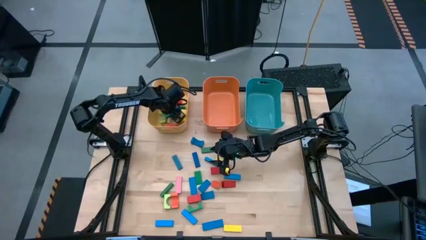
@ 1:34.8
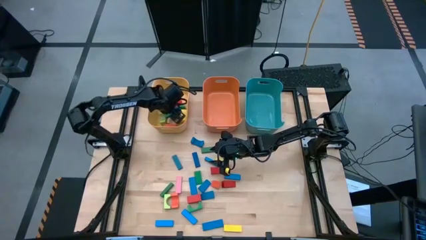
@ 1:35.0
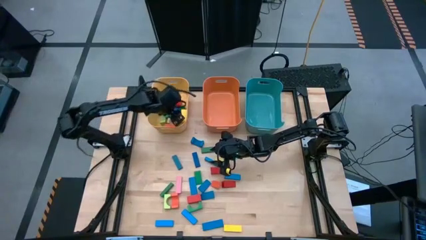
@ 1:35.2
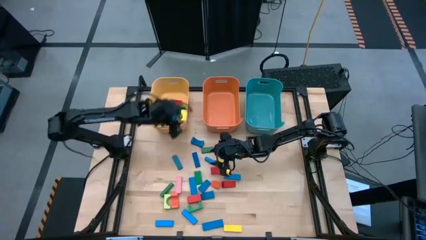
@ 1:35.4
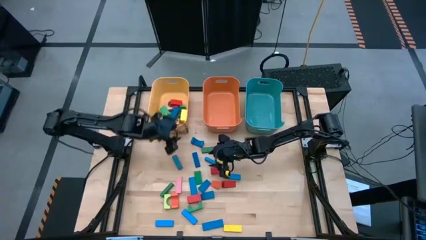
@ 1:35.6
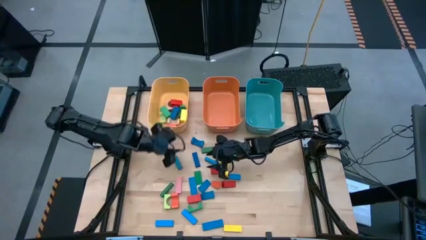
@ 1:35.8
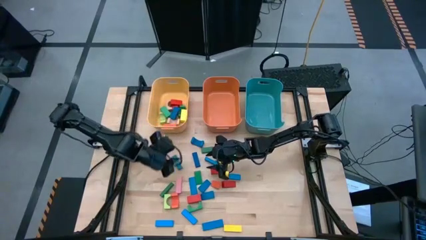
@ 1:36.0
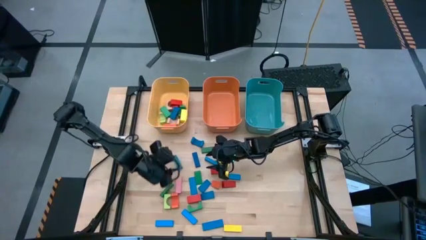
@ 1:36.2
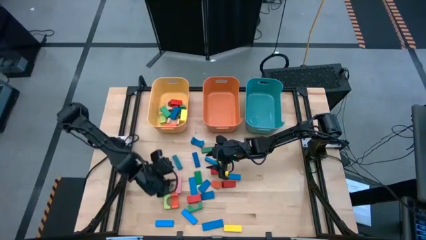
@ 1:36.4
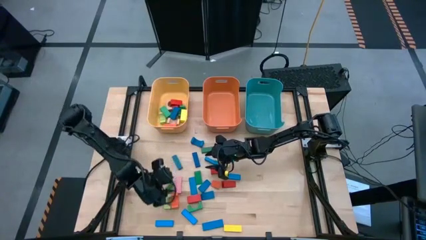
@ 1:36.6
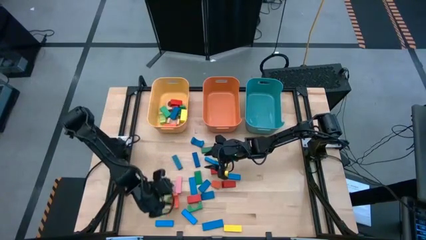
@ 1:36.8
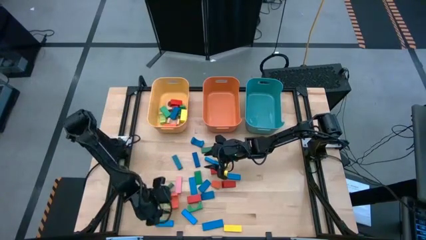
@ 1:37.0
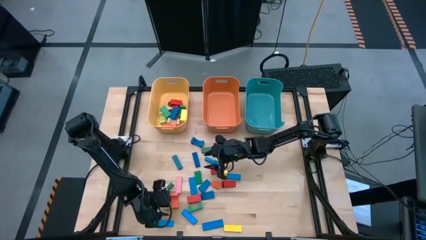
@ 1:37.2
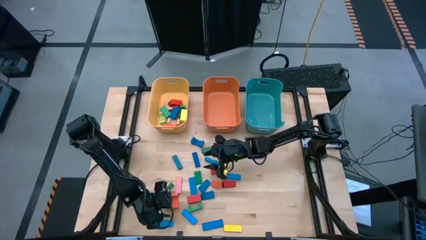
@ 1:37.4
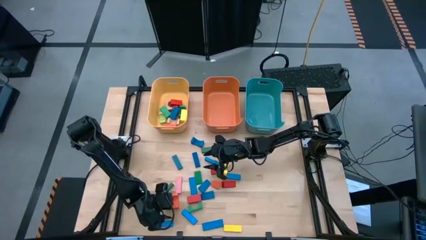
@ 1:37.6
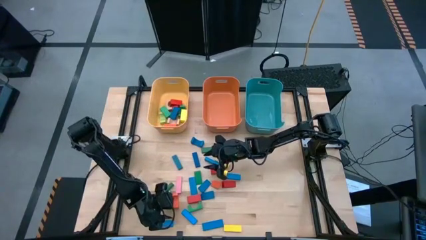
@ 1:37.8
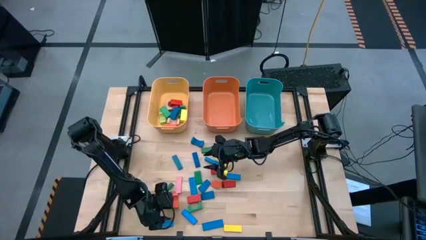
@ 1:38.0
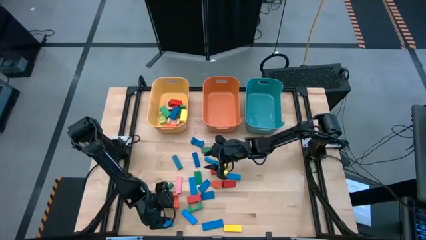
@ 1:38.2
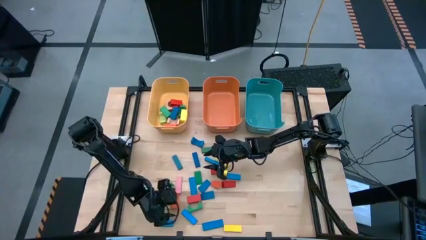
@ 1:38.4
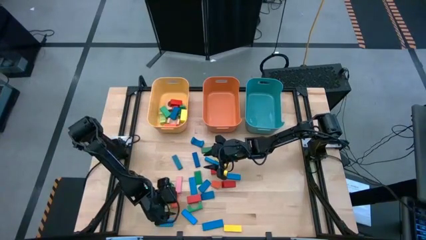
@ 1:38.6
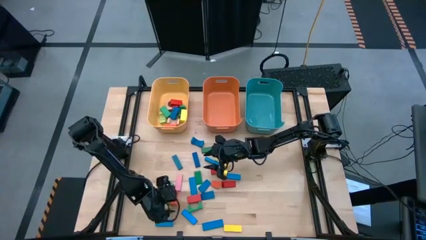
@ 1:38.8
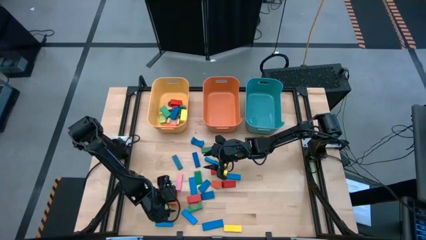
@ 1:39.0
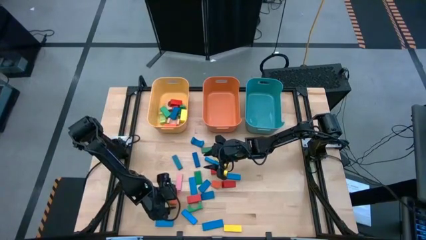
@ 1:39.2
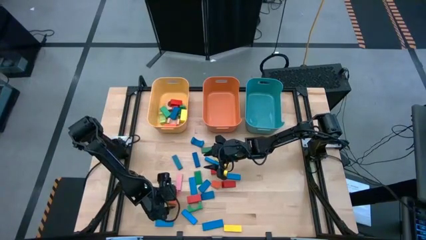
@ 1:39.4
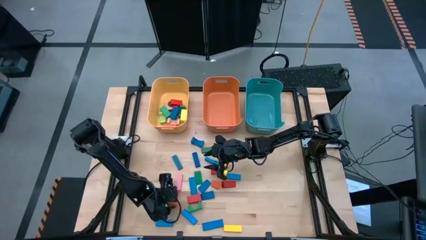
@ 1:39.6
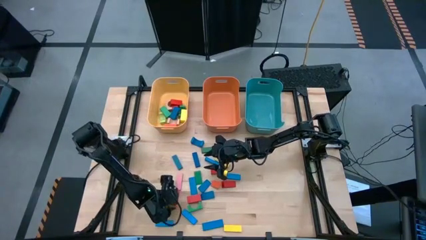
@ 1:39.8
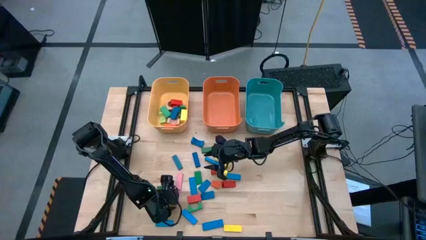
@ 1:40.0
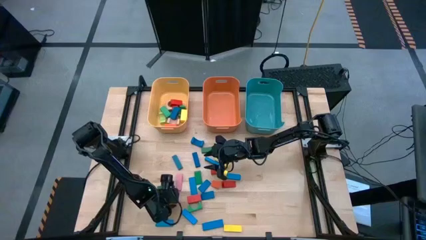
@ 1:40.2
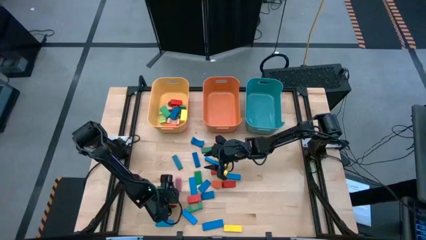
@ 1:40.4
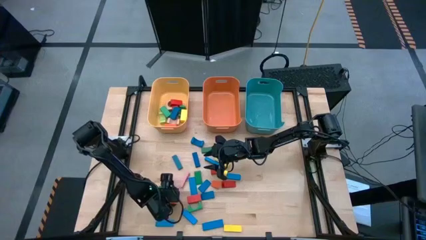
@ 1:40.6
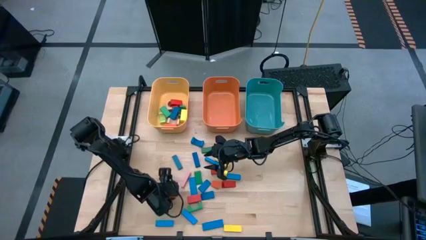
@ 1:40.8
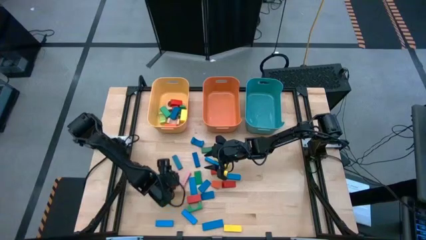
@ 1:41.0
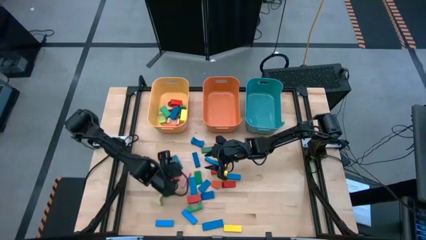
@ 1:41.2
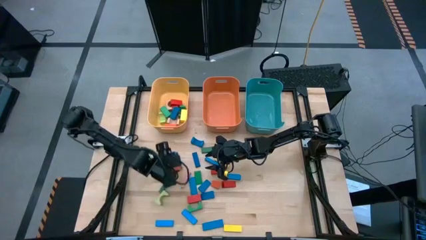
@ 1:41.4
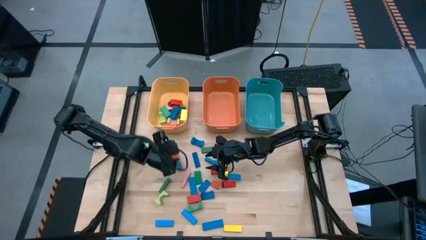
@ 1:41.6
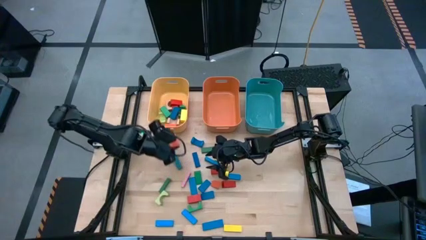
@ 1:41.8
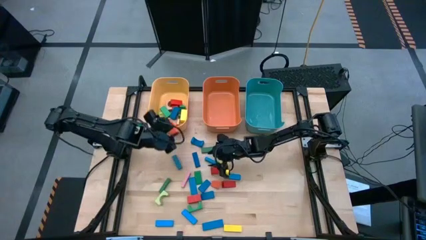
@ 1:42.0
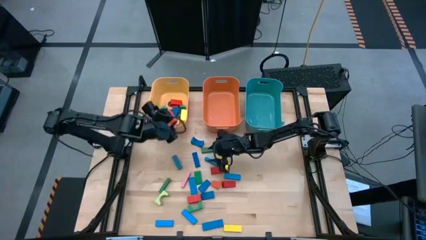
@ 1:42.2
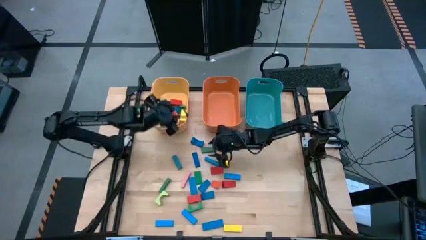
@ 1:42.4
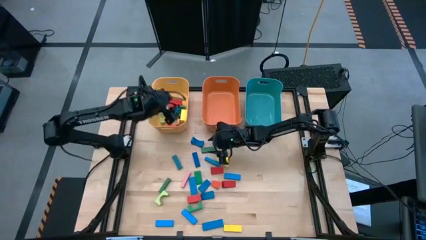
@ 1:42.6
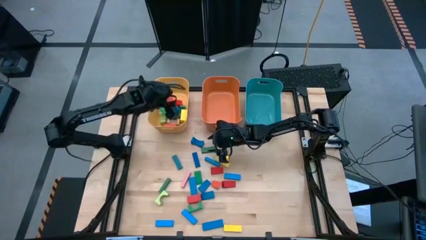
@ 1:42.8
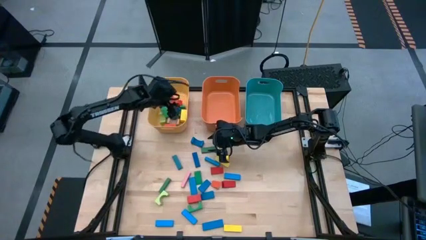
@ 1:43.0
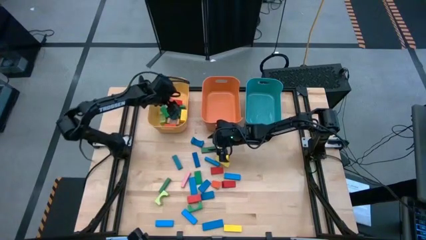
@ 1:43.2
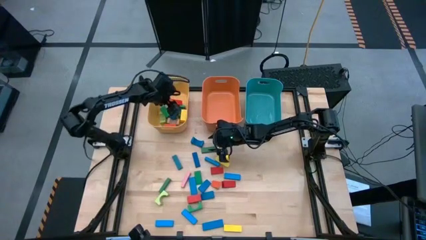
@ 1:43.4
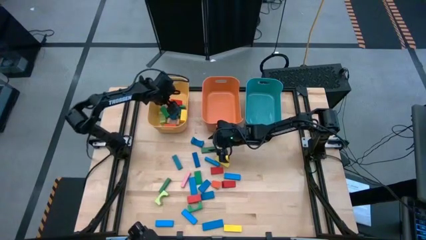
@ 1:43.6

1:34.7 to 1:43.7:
Task: Sort blocks by size
Put the orange arch block into the yellow bin

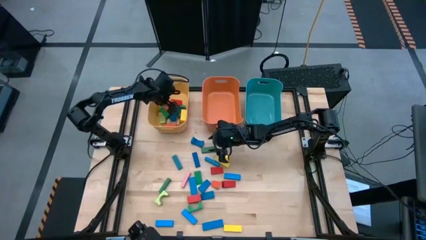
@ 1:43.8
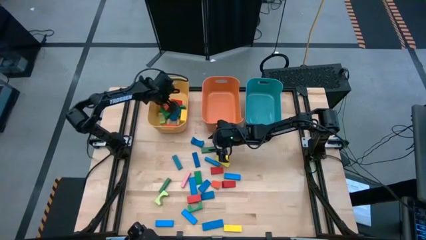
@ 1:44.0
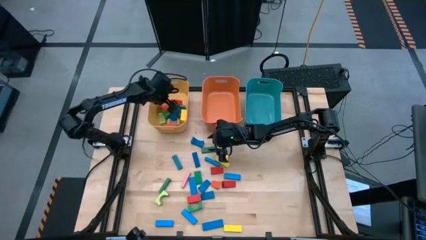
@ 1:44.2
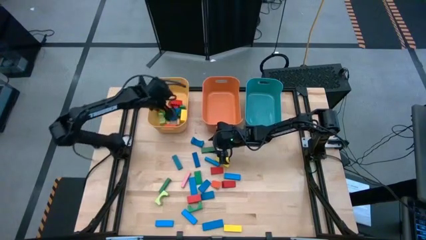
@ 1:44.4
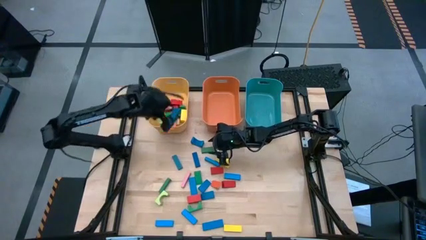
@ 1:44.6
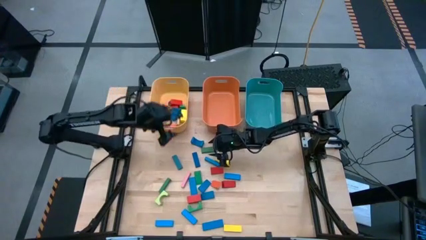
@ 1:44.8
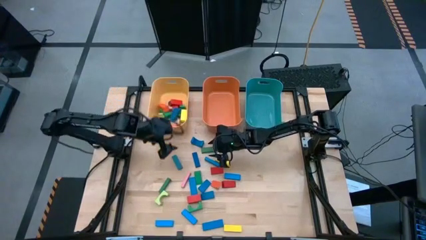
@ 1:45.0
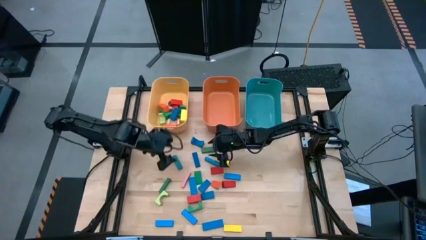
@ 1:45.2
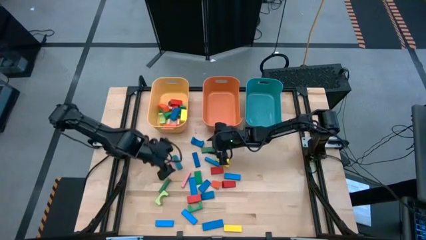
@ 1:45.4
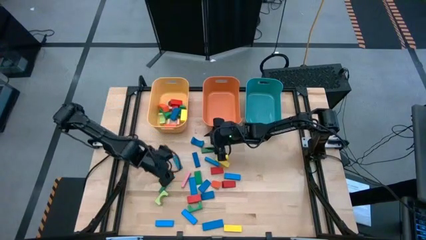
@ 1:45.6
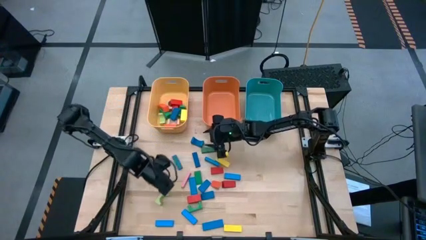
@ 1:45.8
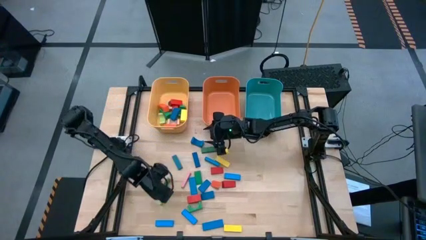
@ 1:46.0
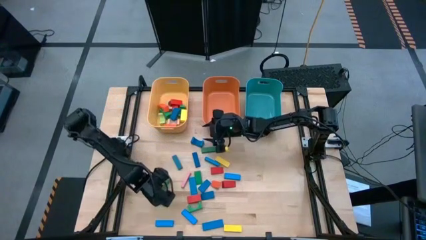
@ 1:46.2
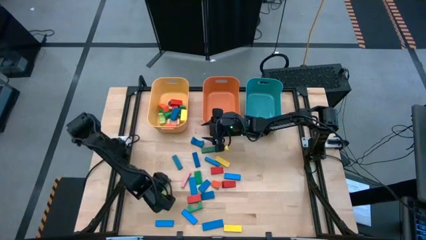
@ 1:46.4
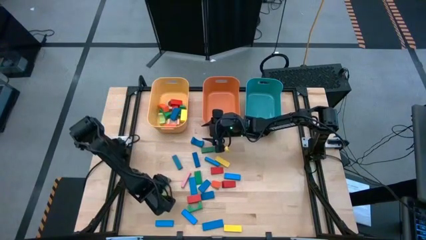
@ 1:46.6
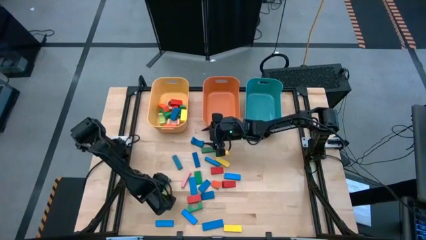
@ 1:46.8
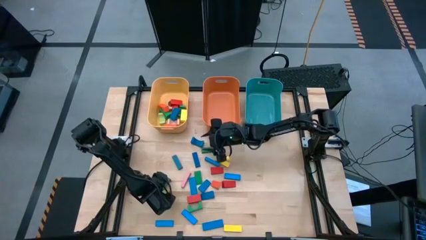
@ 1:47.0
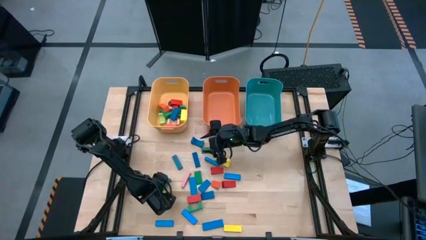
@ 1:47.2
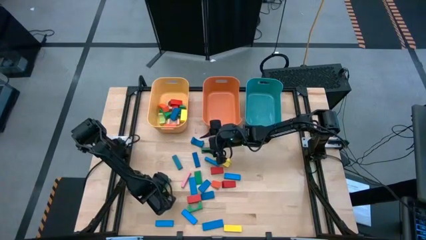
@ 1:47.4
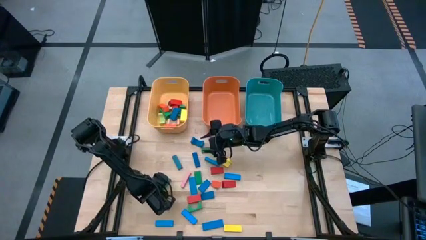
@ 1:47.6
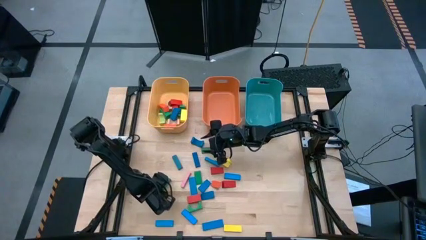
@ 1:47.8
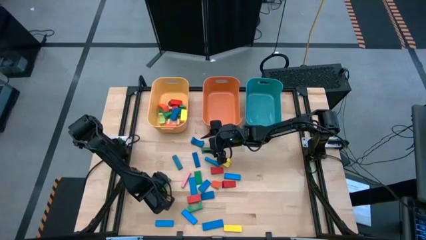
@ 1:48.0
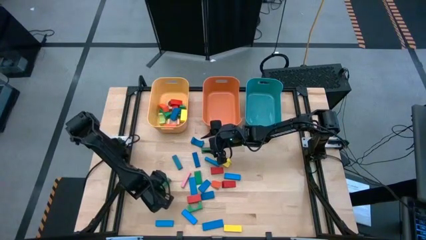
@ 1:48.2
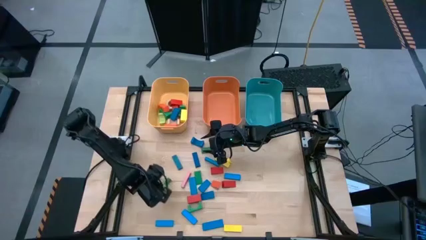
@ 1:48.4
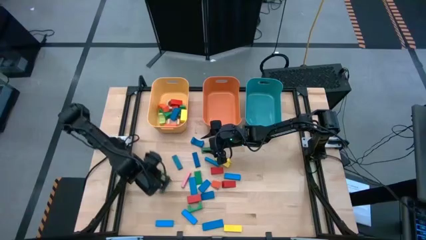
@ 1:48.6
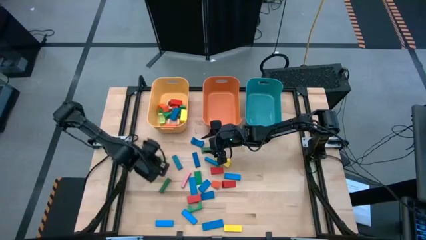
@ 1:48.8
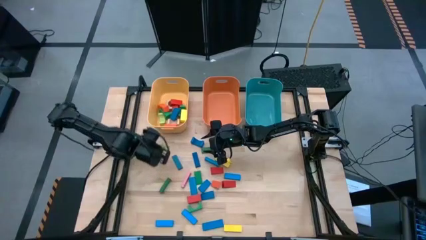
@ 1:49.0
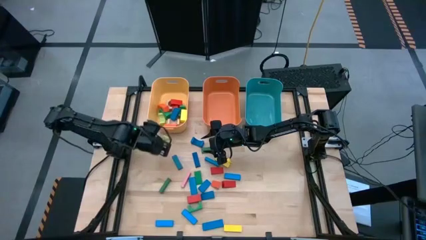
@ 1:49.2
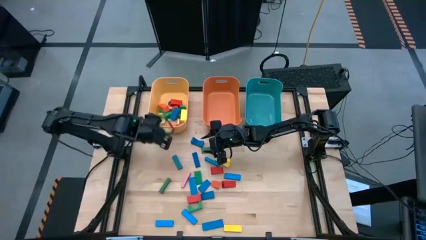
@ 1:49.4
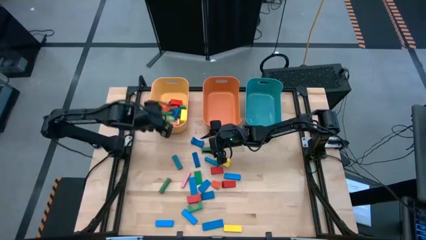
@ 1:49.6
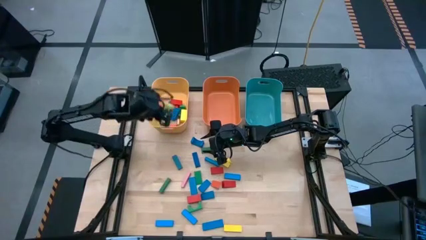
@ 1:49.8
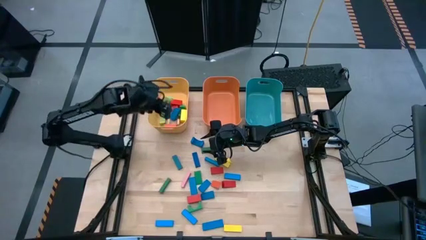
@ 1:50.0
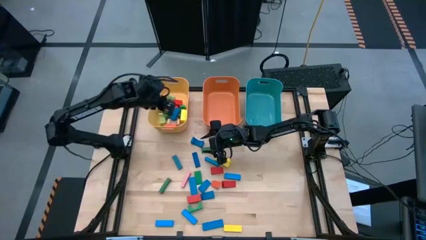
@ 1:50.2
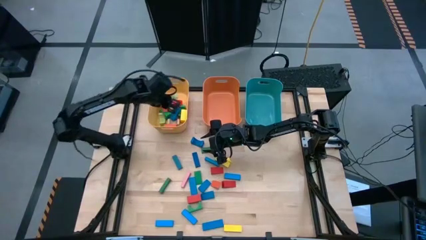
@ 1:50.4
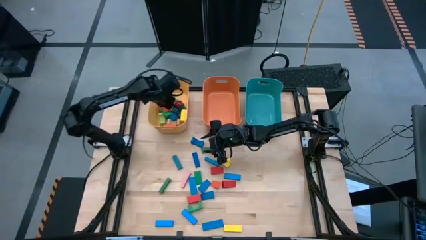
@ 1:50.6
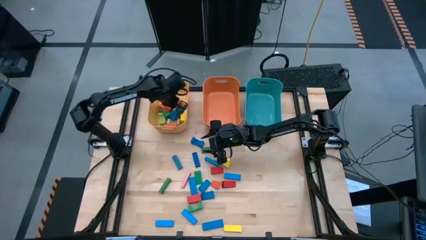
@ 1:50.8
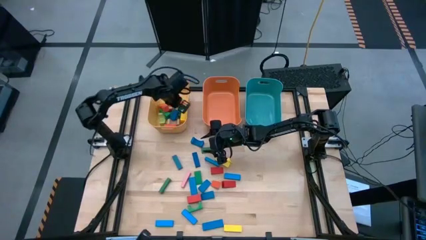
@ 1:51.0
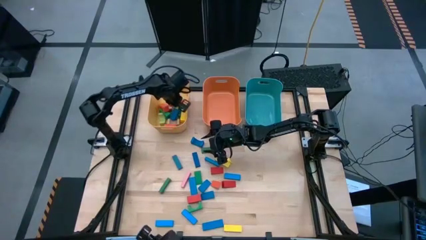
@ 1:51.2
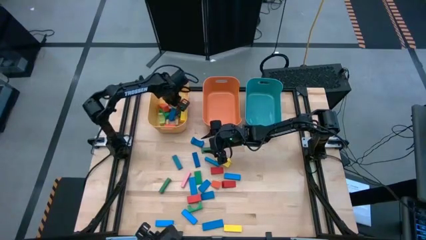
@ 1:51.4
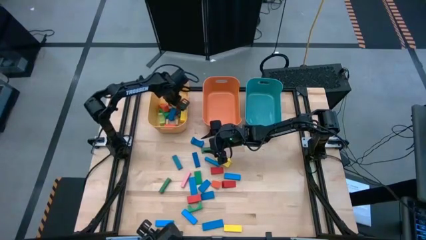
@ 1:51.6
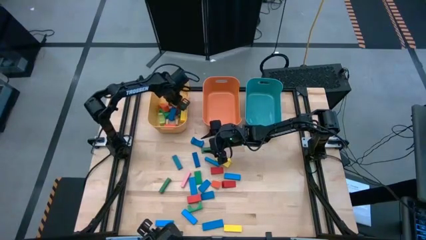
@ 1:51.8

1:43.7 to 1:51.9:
Put the light green arch block into the yellow bin
